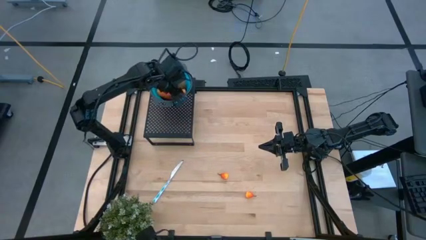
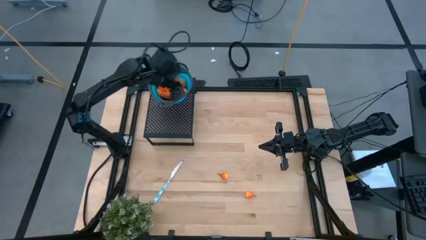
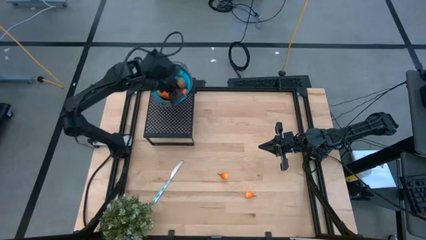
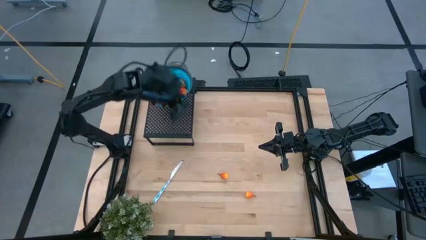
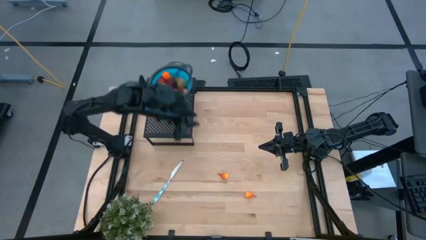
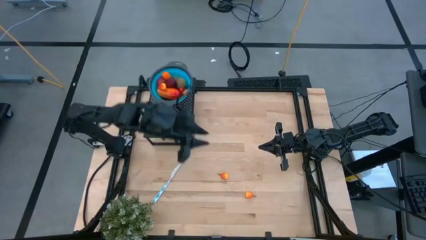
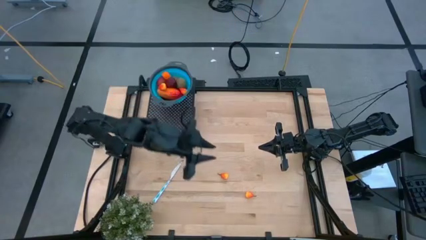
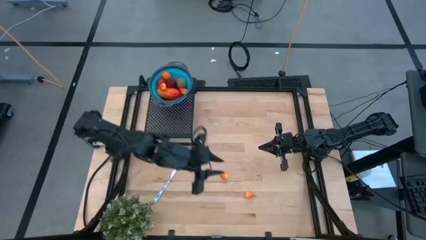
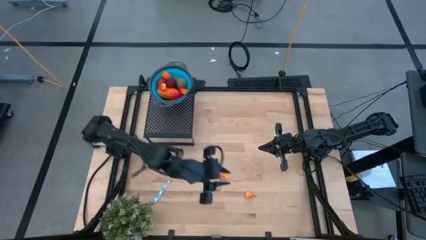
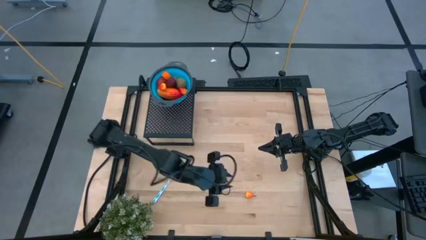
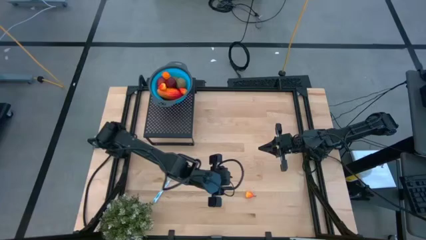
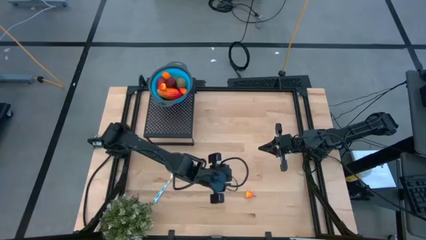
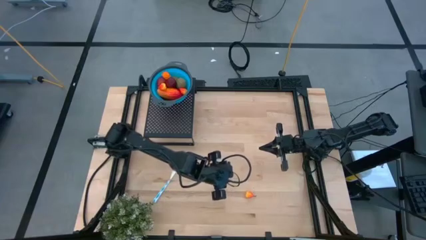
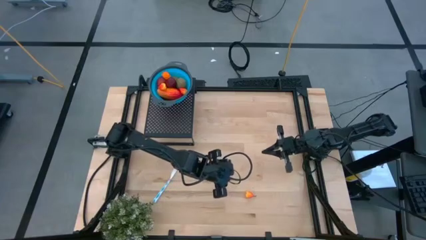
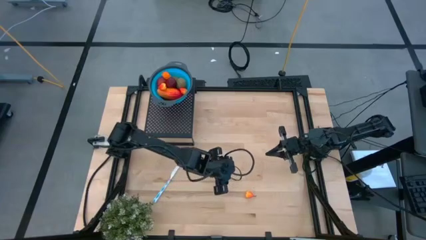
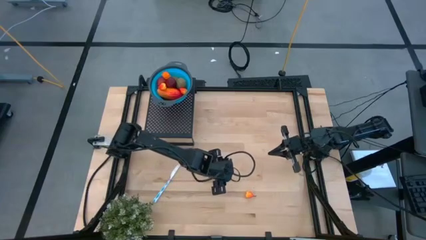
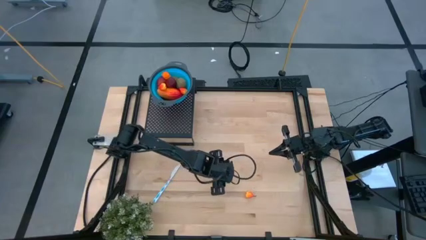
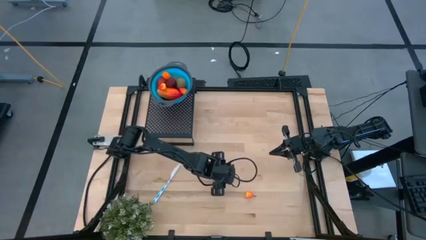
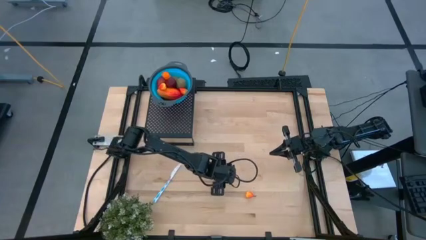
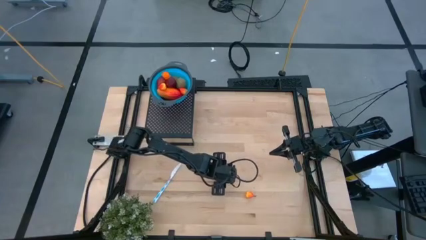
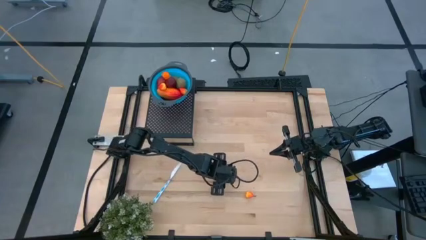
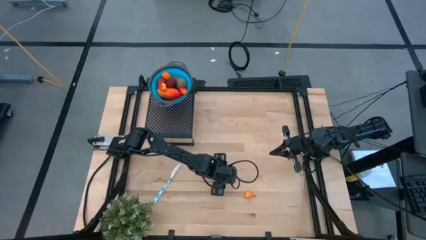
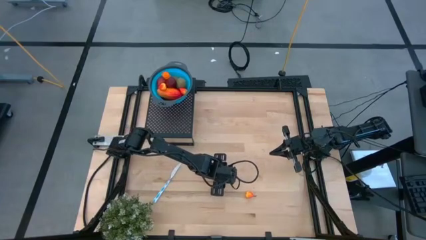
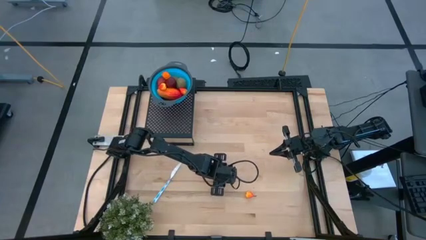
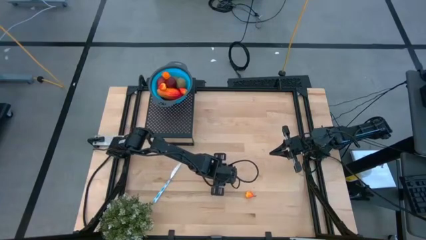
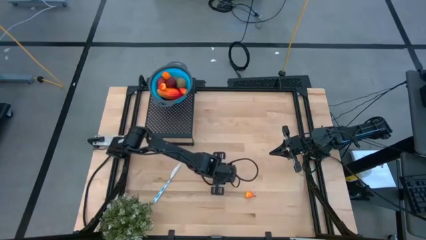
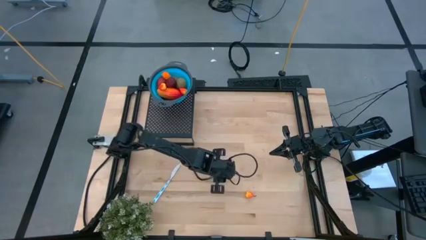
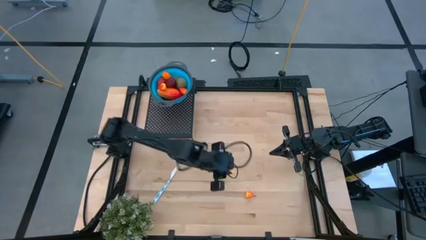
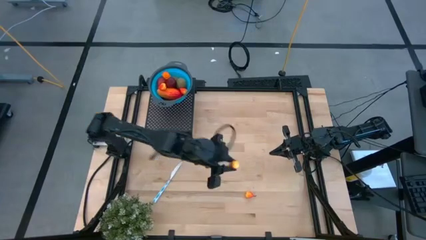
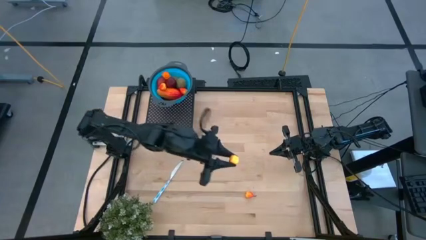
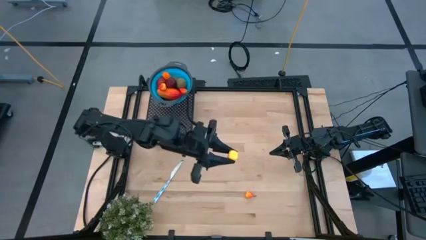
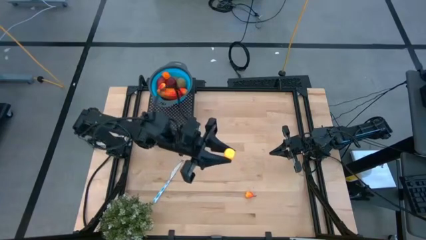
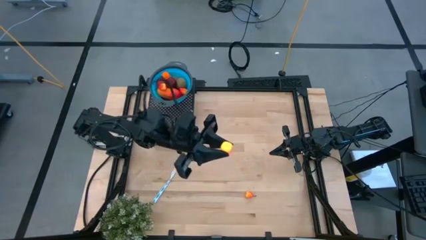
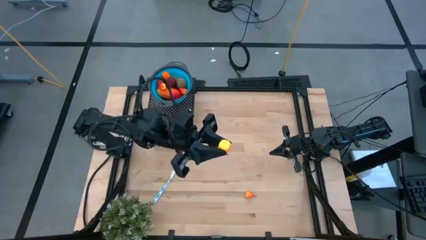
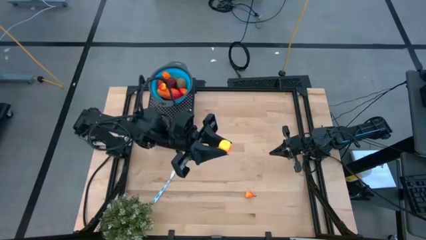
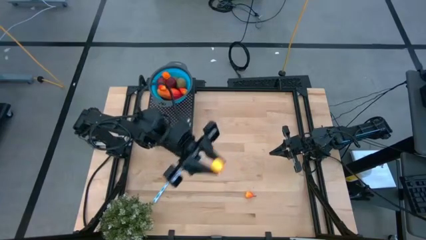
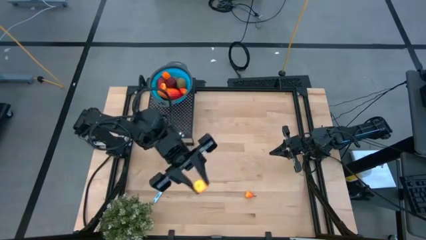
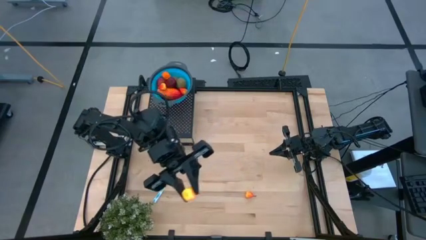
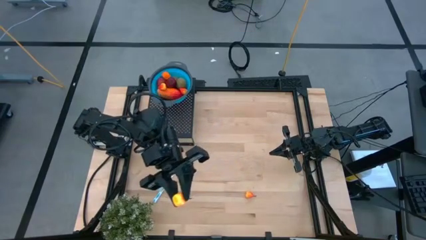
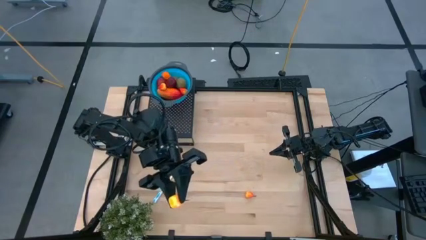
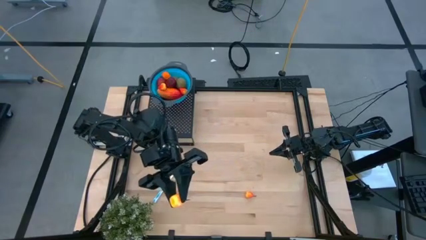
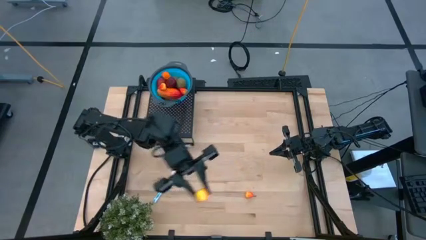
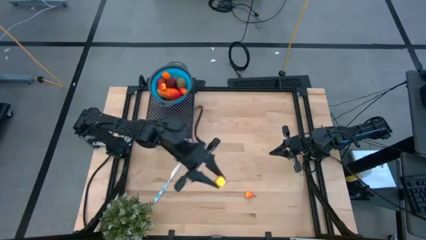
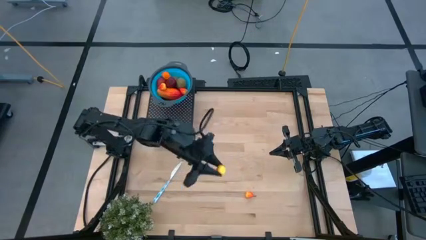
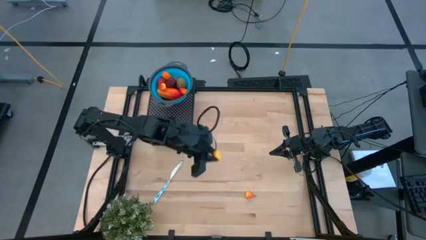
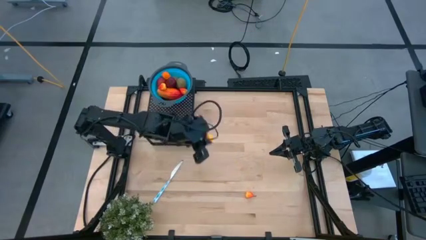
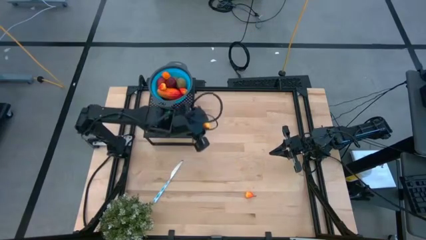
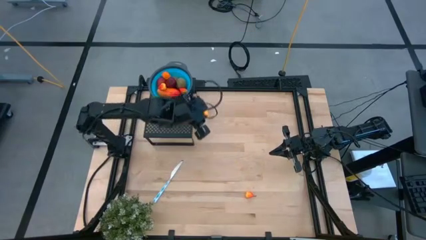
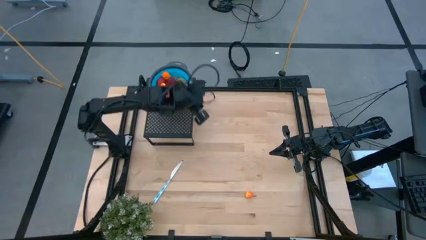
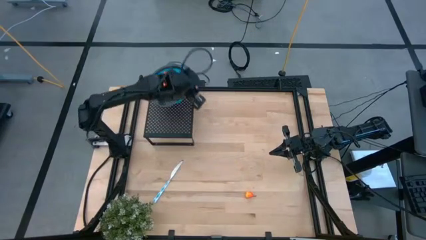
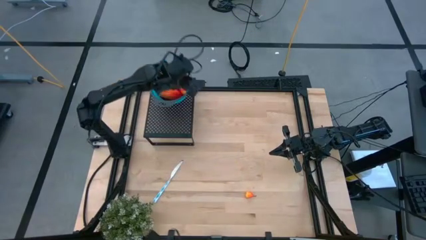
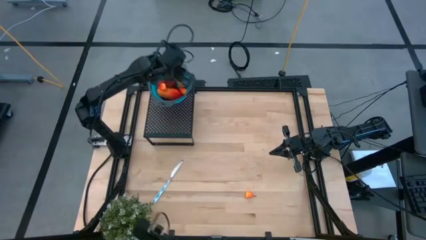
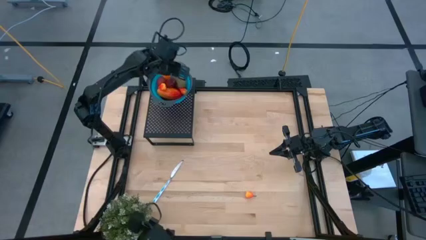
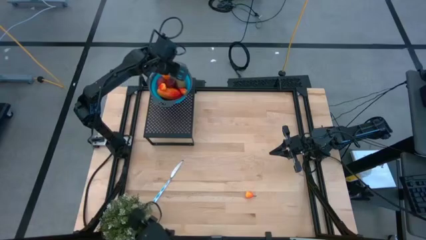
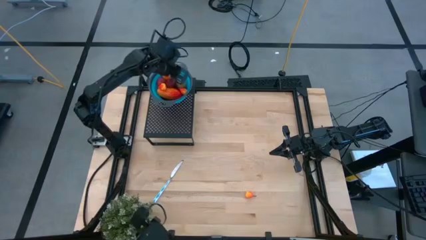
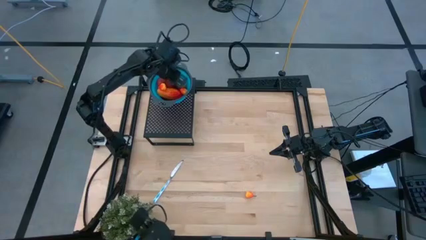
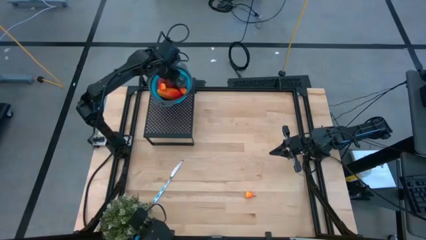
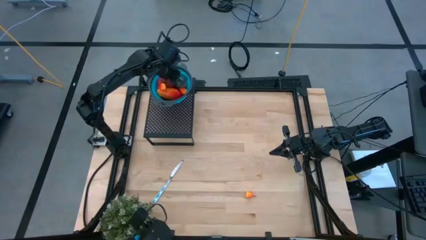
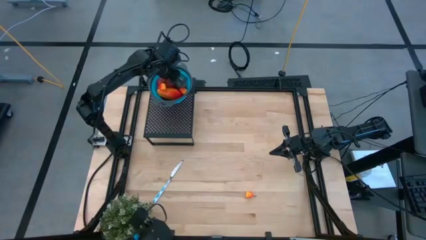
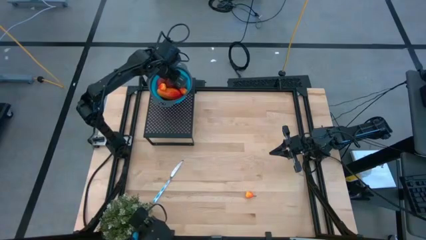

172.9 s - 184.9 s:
Task: Pick & Place Fruit
Put the orange pear into the blue strainer bowl on the shelf

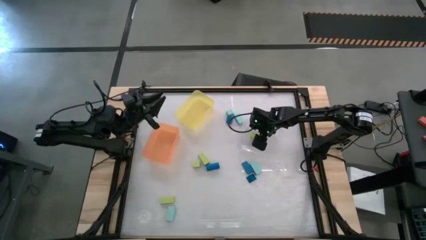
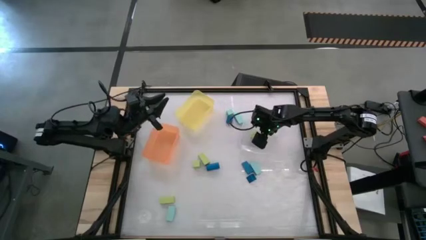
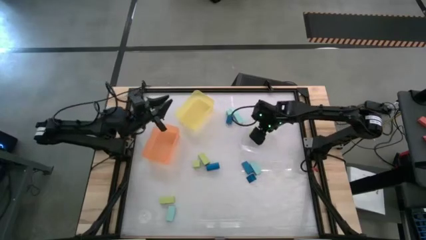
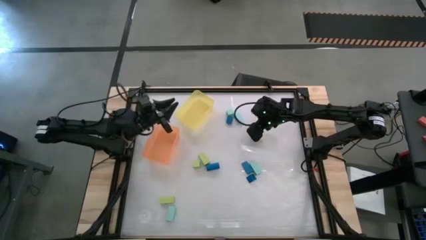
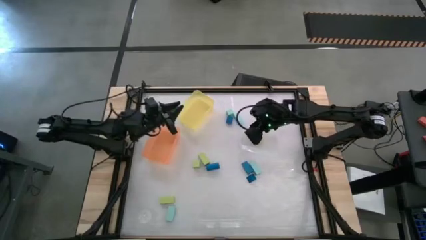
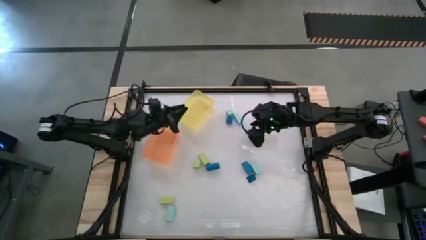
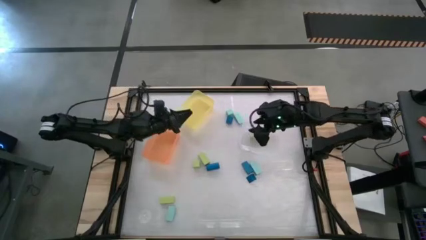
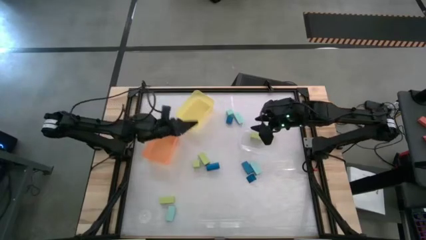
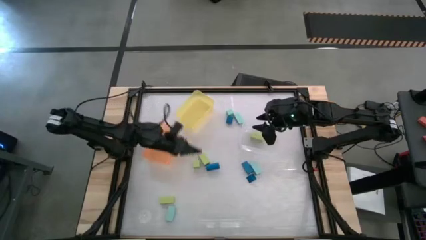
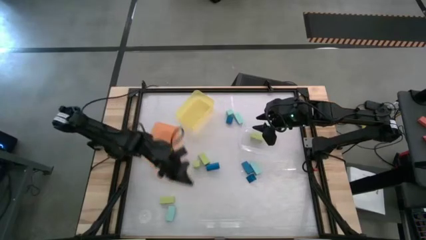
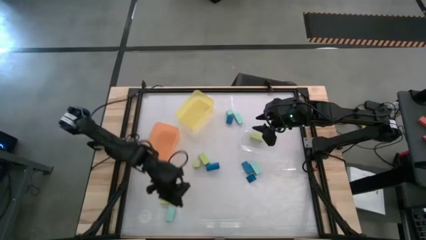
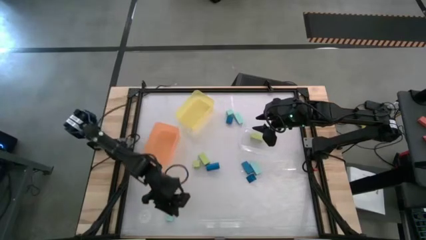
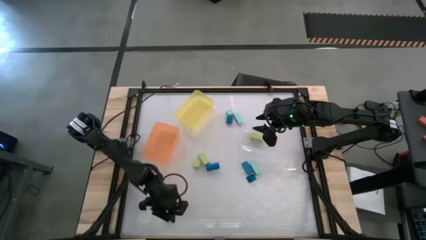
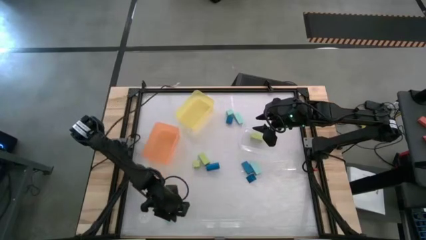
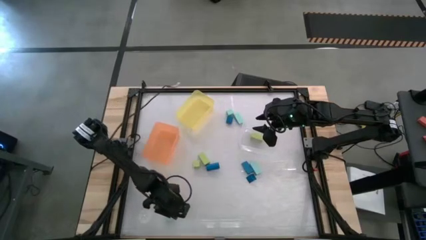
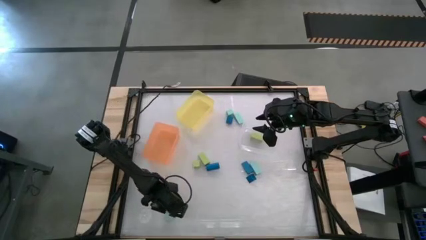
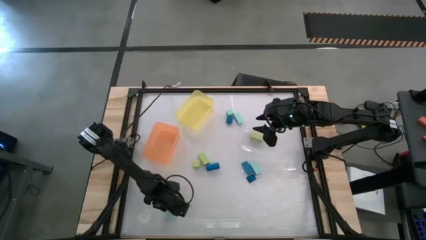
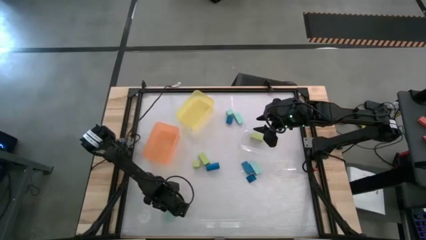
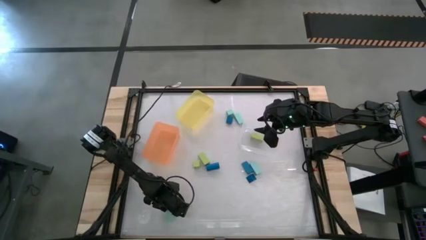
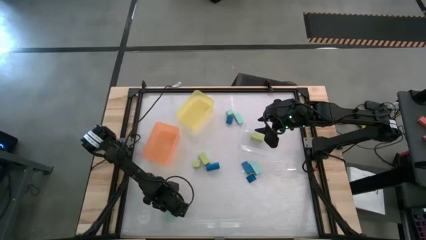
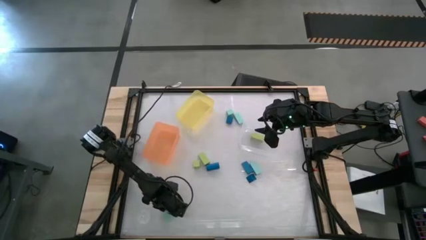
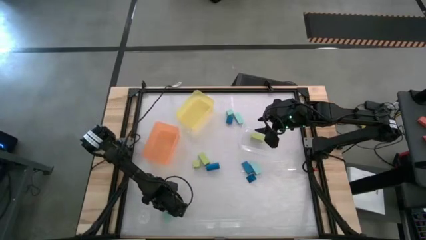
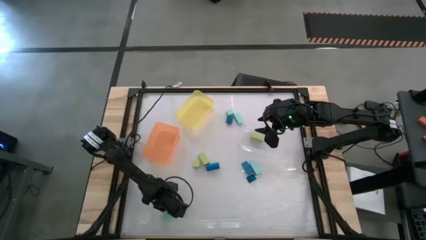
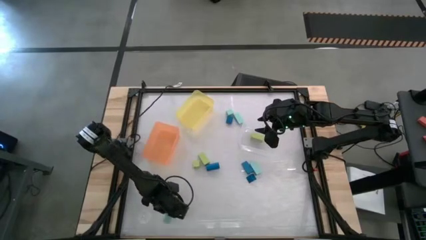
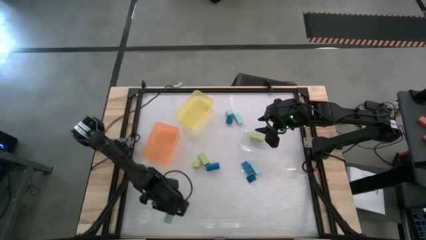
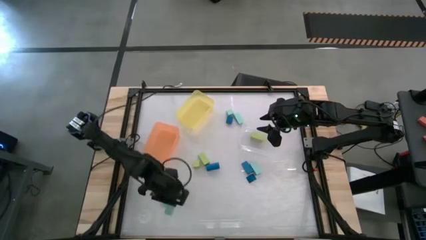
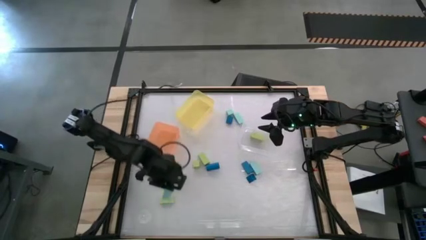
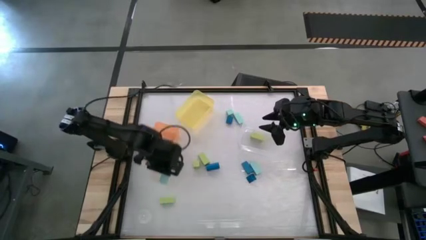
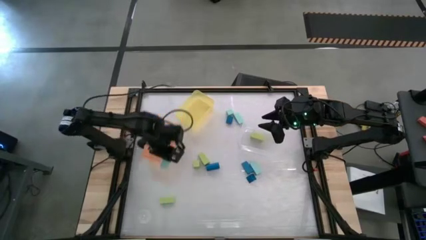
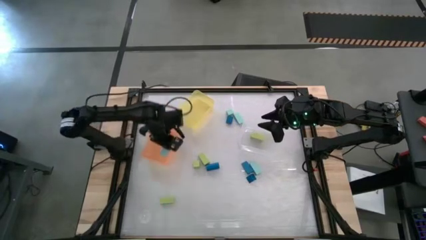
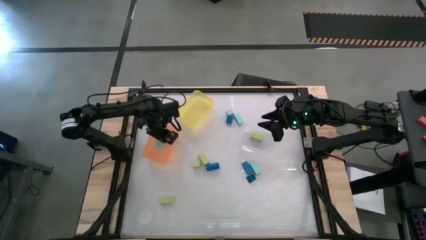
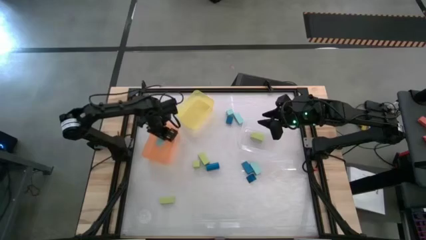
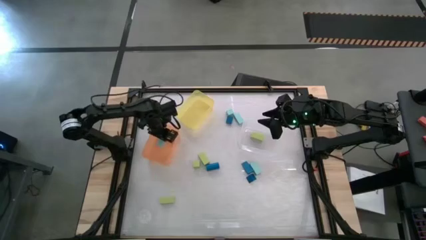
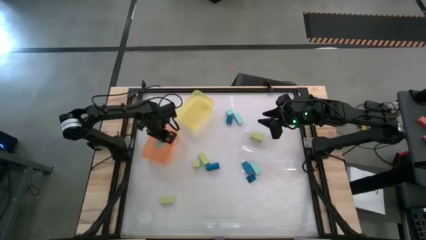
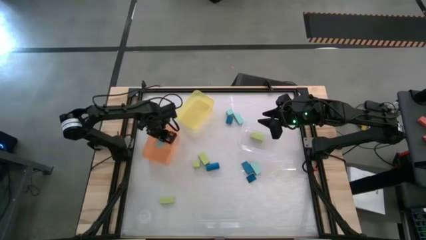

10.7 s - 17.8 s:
Task: Sort & place blocks by color
Put the light blue block into the orange bin
